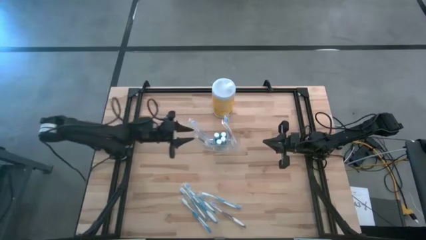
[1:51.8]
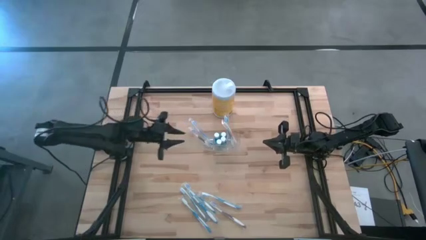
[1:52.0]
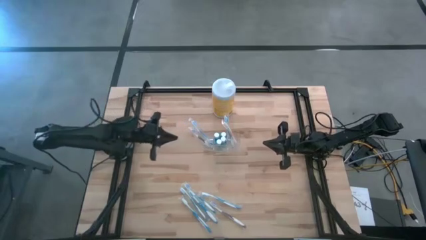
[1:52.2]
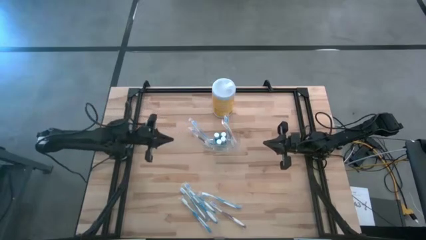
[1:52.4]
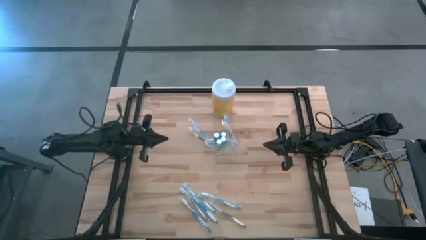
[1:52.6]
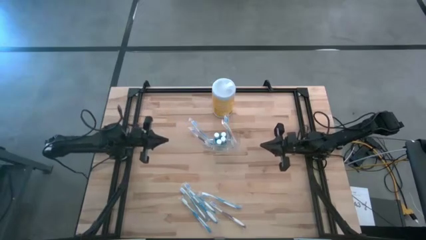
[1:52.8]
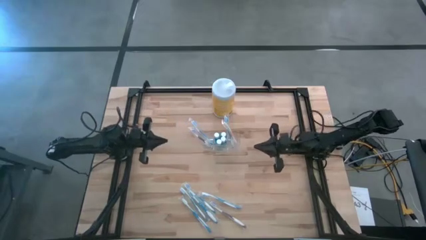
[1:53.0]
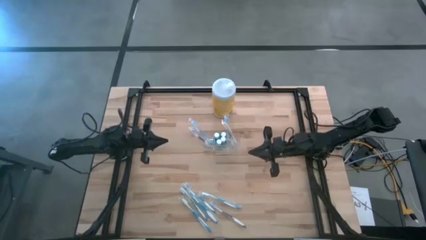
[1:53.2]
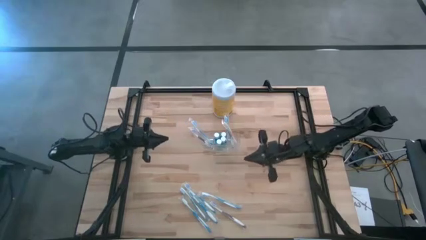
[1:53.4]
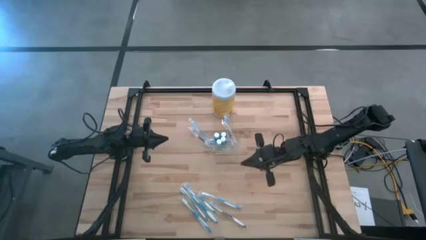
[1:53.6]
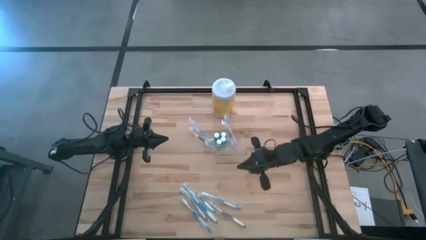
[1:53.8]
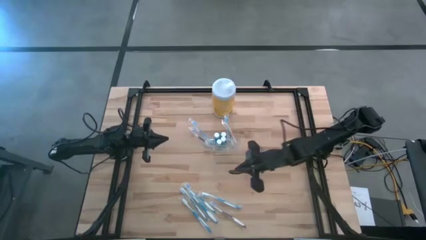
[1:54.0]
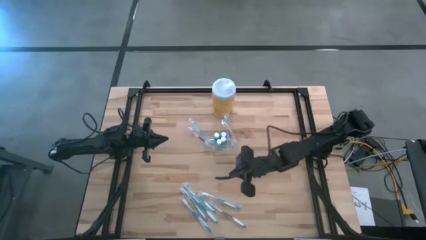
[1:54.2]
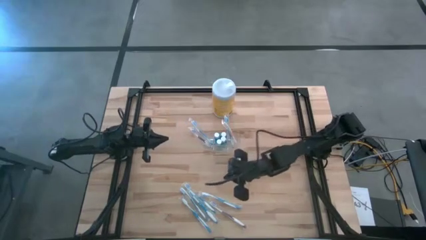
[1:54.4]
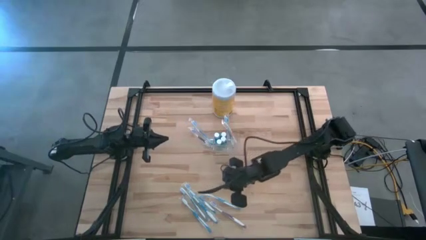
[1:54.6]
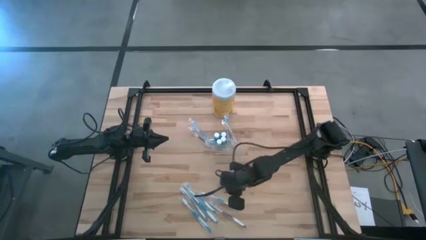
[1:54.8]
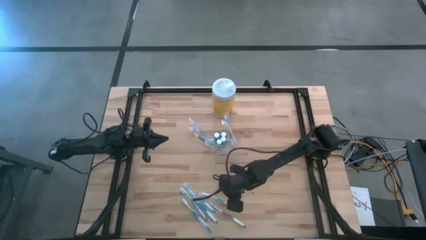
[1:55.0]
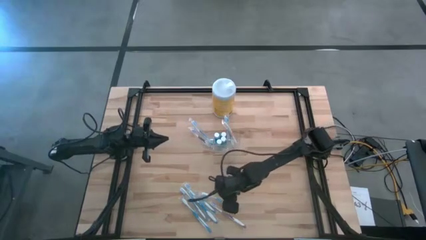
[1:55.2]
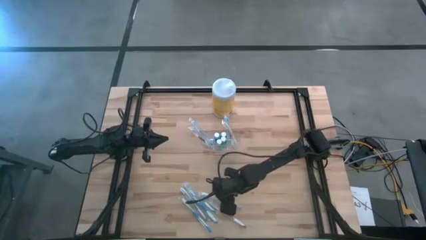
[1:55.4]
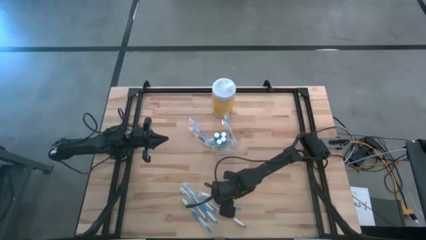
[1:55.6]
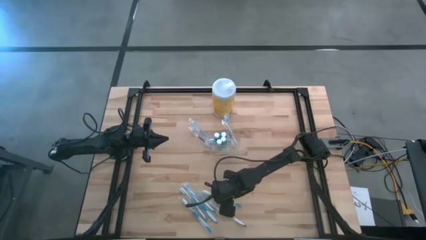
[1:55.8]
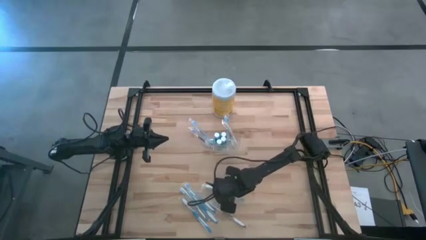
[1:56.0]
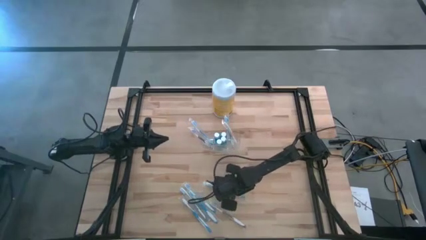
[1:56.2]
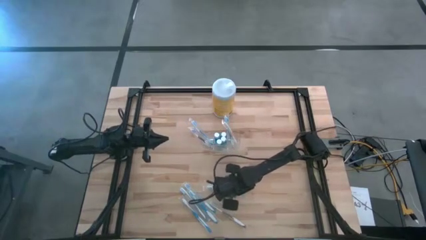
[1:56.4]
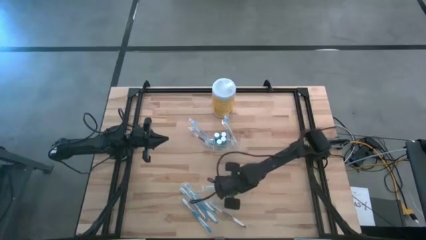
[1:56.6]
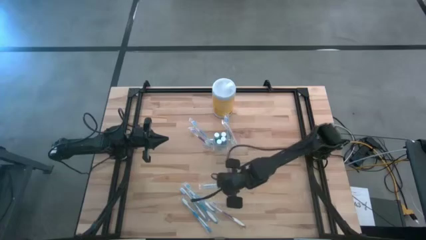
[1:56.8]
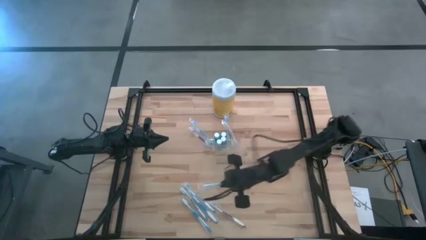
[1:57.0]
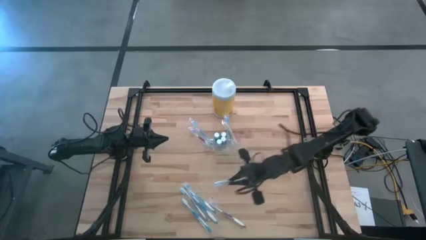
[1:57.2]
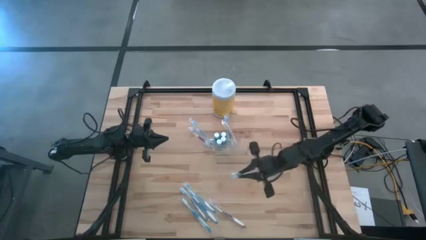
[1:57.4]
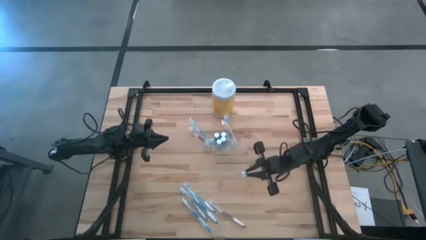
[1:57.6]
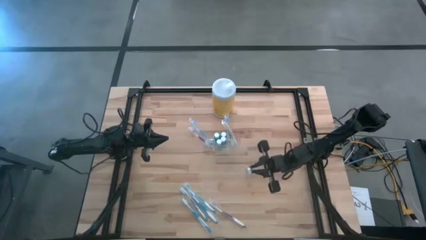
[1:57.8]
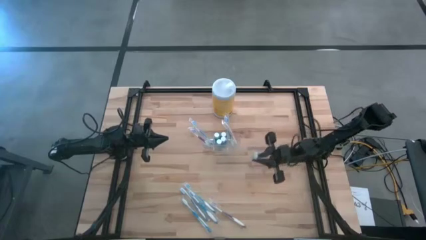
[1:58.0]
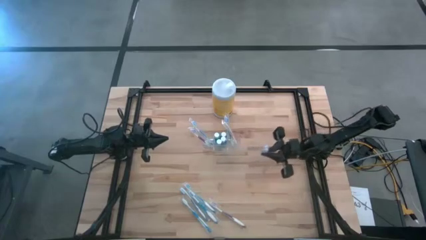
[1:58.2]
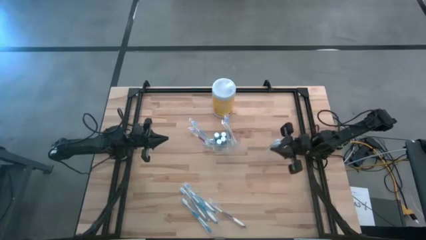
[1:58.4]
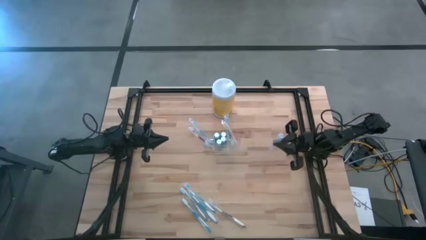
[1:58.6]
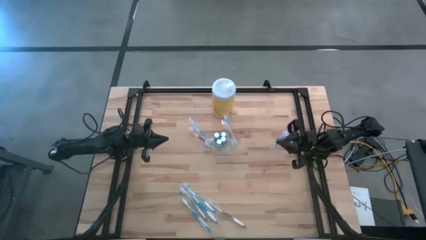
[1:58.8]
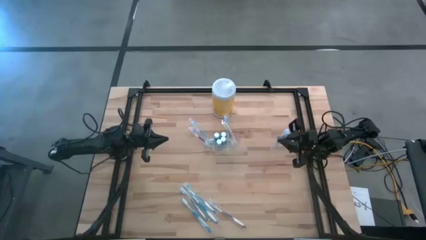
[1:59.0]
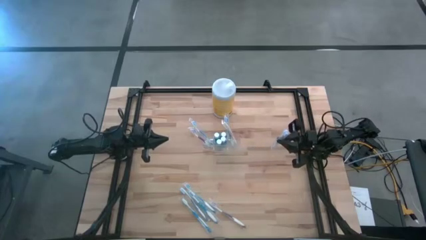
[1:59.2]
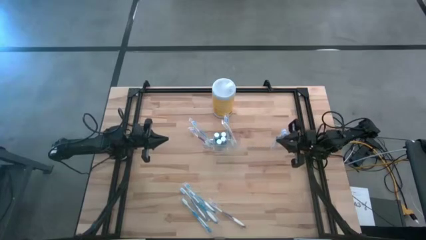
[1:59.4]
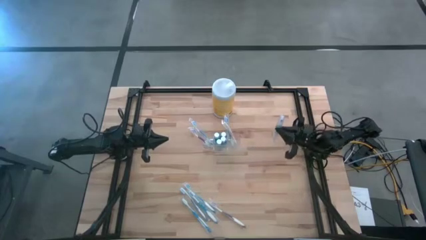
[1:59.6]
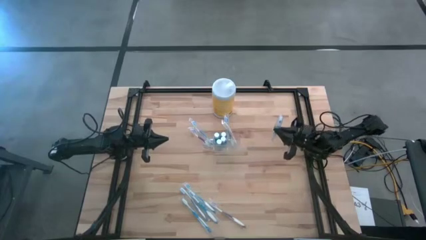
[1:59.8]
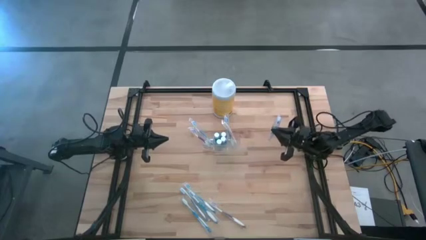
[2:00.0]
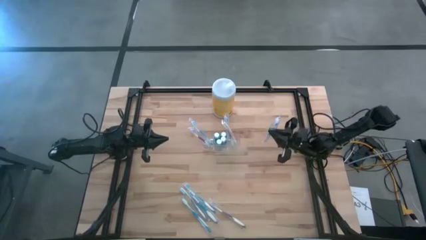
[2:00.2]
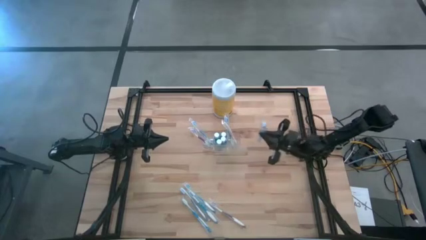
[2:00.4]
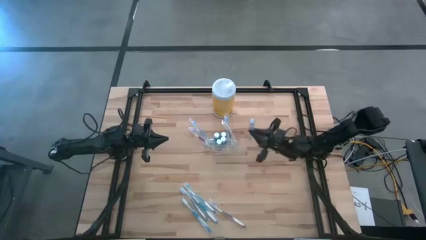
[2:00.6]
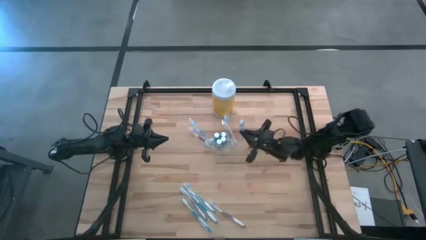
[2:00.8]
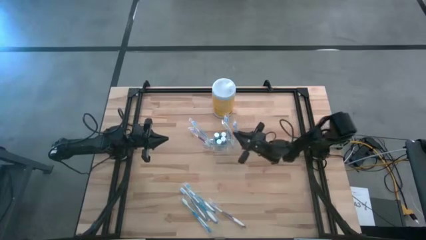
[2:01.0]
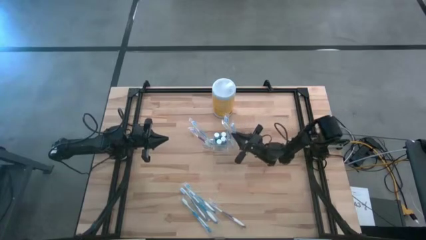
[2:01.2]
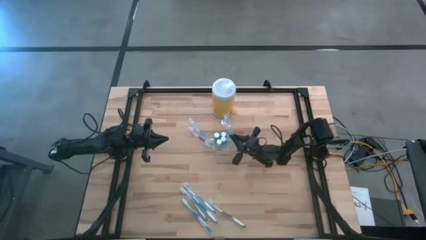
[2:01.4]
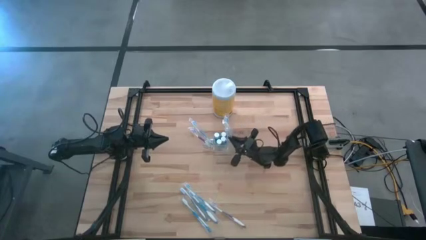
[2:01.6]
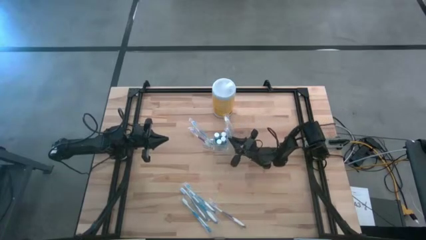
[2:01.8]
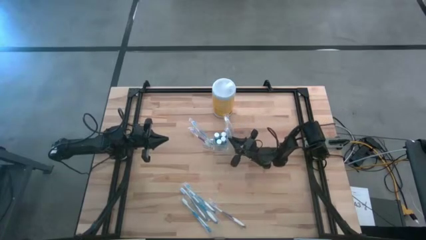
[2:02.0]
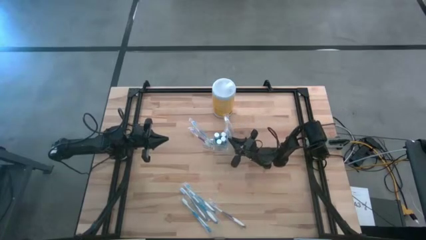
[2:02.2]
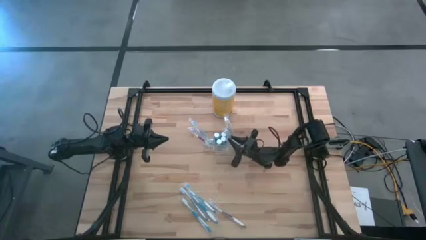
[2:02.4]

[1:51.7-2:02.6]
Task: Pick & Place toothbrushing station
Put the blue toothbrush into the transparent organizer

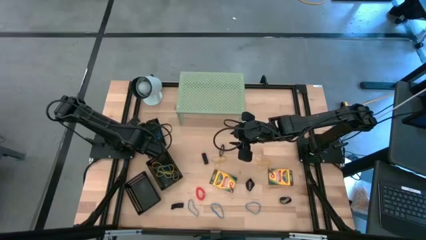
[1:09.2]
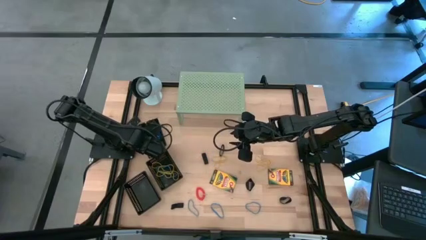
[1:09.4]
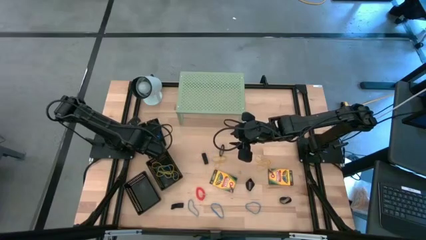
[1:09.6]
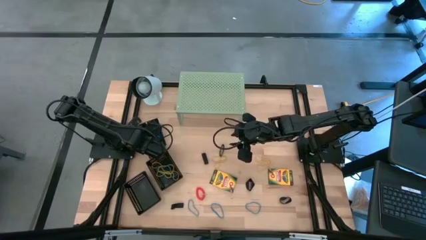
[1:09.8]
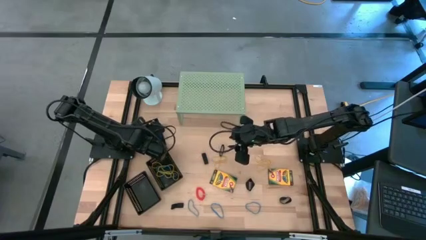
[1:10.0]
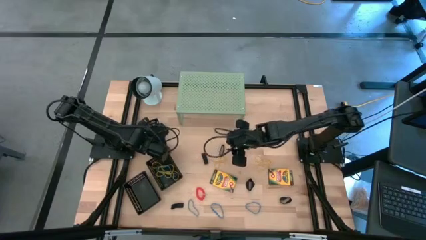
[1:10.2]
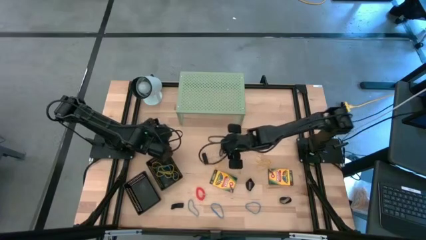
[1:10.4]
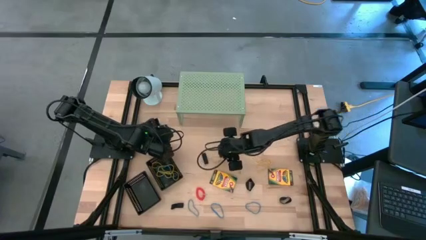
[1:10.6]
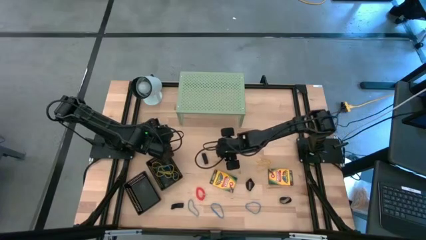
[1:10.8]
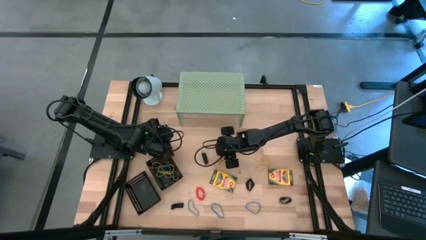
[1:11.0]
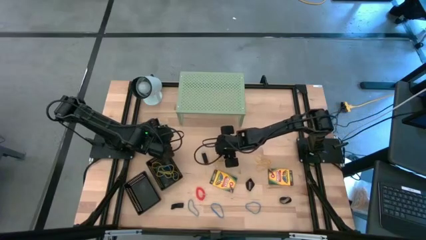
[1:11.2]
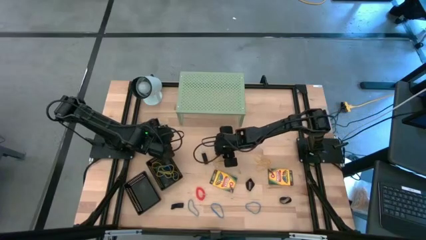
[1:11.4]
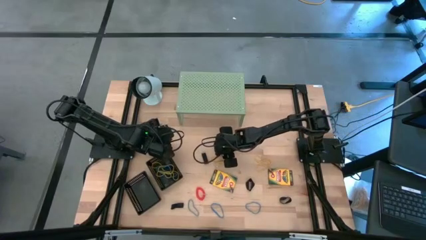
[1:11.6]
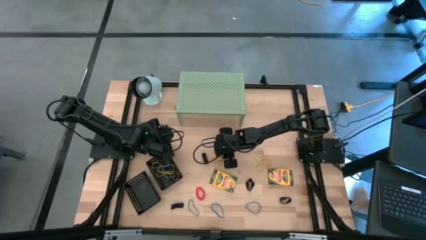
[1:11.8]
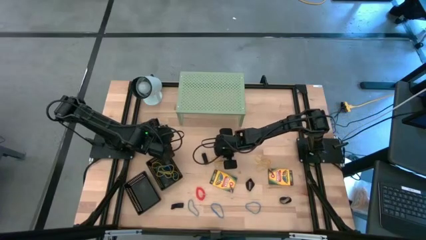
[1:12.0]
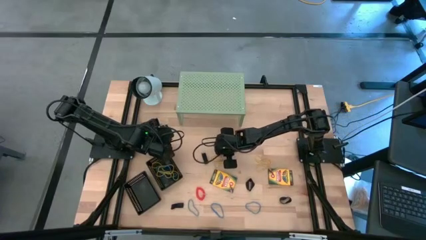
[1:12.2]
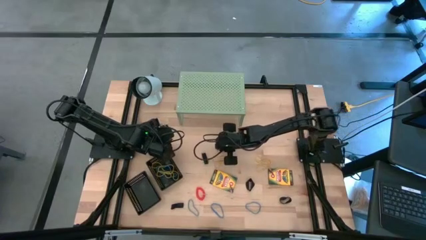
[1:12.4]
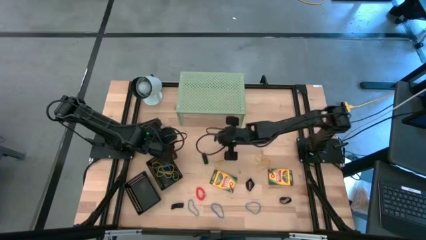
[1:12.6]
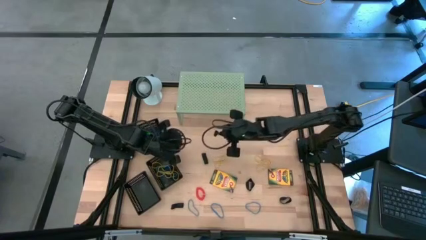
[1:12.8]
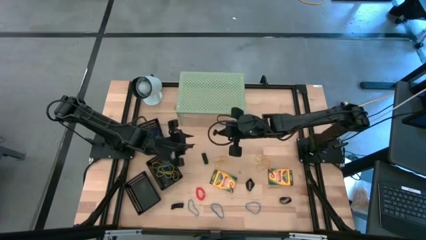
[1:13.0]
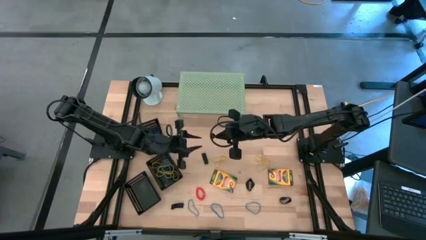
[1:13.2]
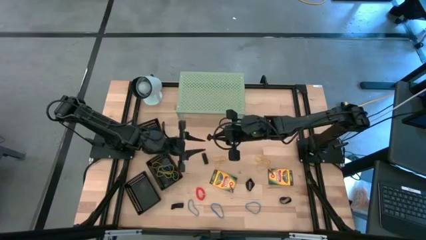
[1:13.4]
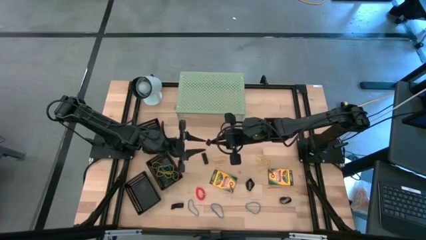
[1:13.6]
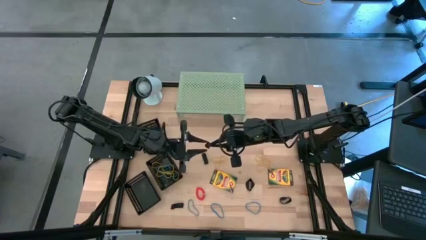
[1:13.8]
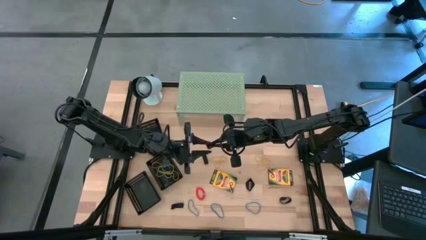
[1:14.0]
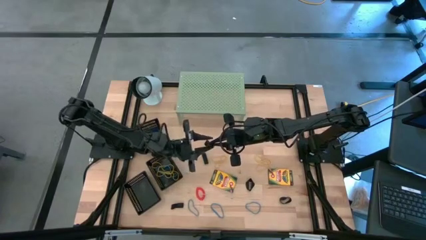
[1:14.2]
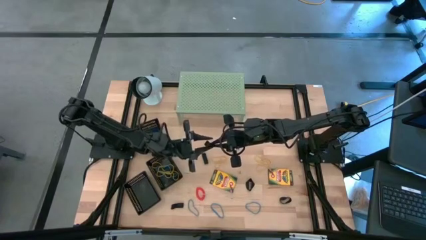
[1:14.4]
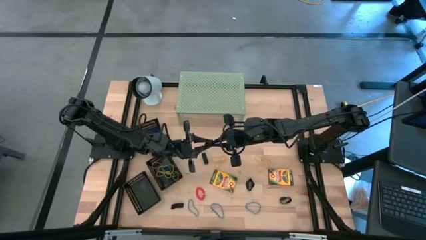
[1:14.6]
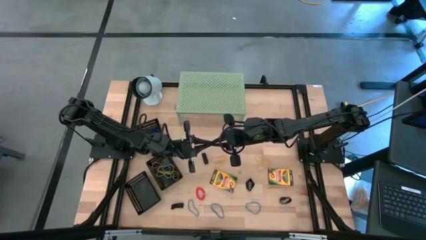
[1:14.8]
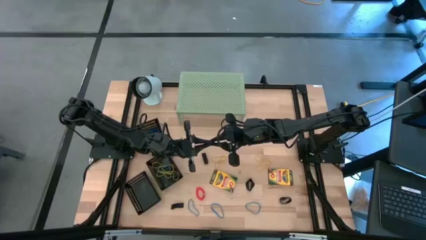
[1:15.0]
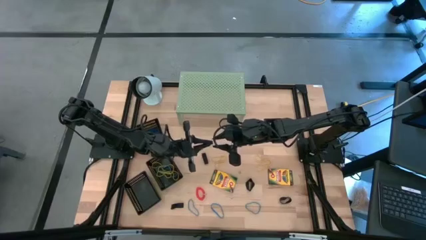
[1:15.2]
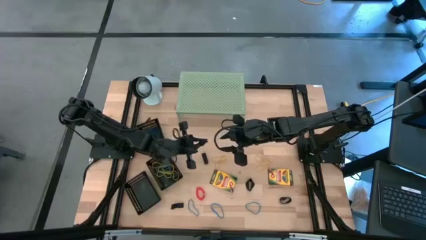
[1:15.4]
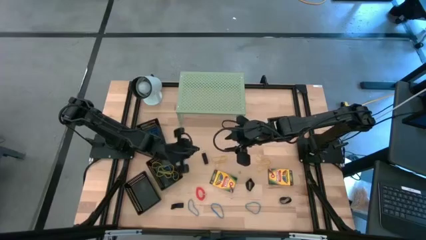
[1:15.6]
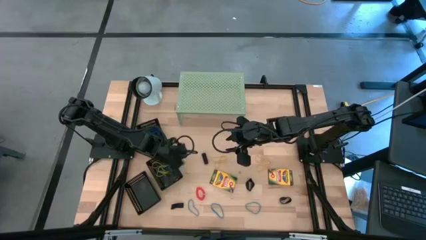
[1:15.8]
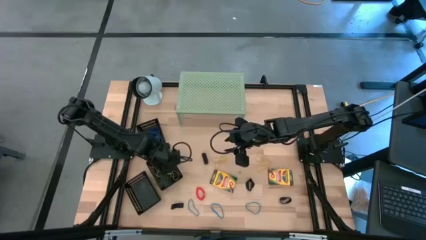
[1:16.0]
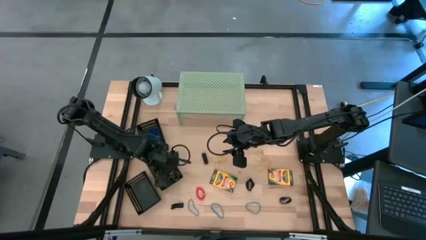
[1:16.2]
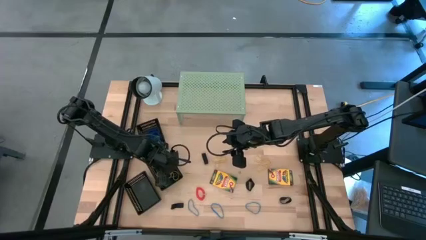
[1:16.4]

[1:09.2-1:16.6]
Task: Pick & Place Office Desk Supplies
Put the black rubber band into the middle black bin
